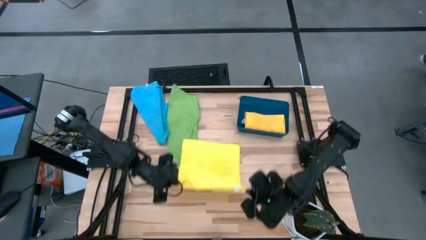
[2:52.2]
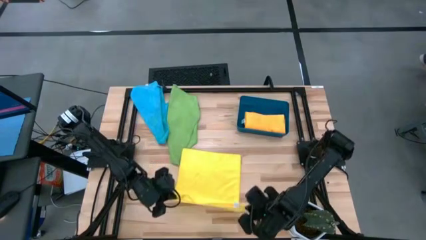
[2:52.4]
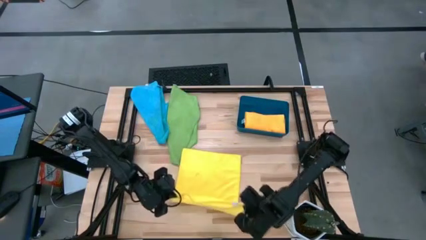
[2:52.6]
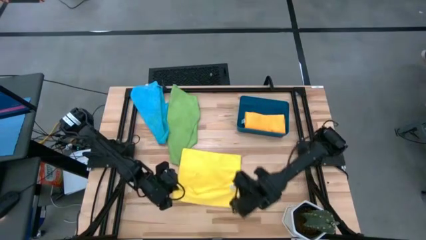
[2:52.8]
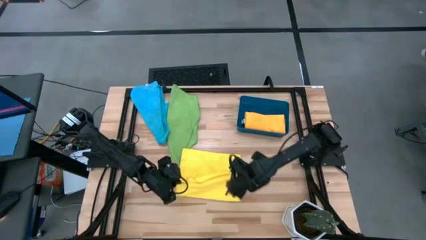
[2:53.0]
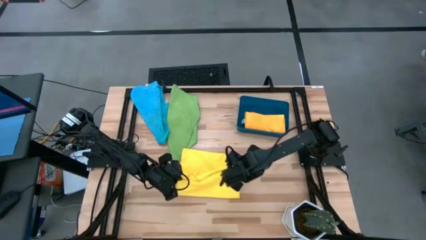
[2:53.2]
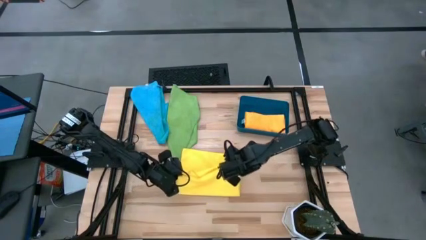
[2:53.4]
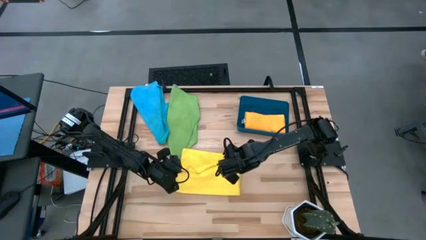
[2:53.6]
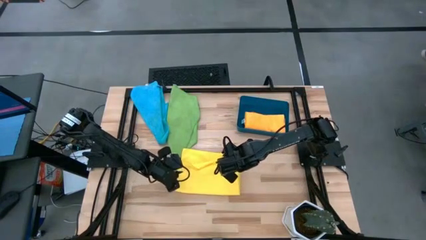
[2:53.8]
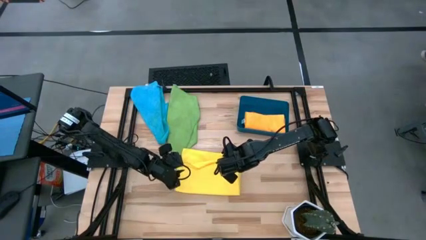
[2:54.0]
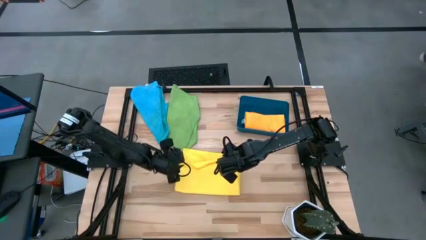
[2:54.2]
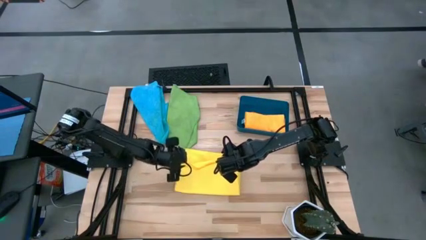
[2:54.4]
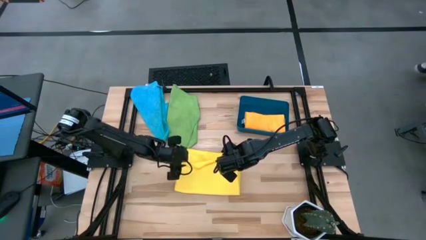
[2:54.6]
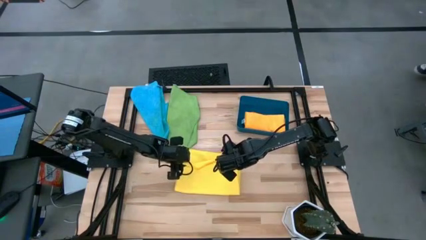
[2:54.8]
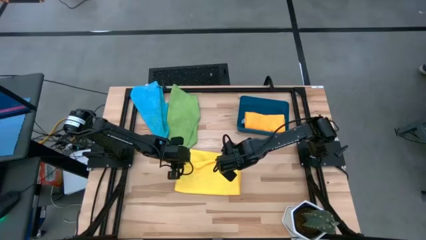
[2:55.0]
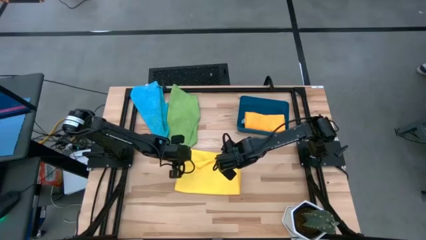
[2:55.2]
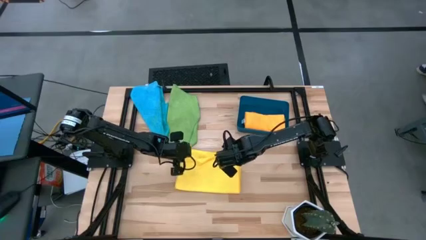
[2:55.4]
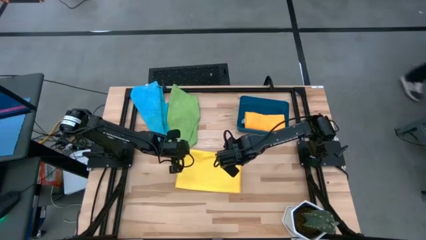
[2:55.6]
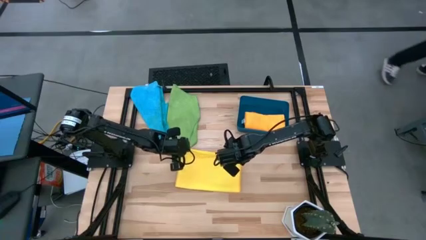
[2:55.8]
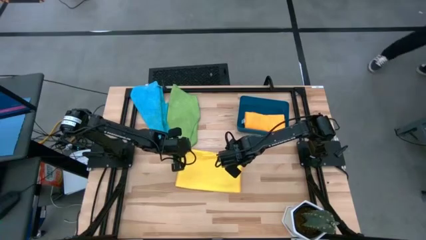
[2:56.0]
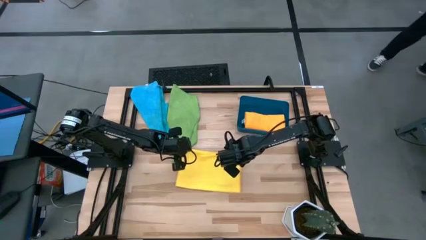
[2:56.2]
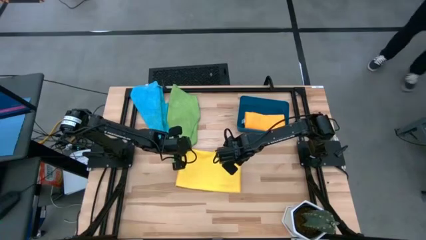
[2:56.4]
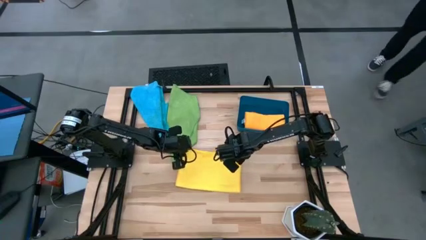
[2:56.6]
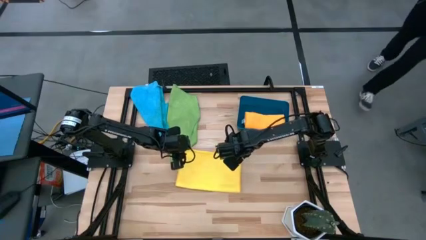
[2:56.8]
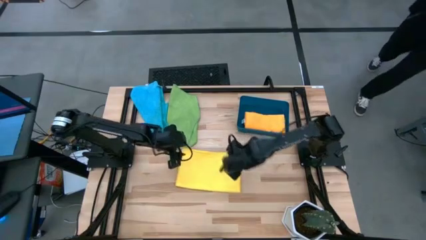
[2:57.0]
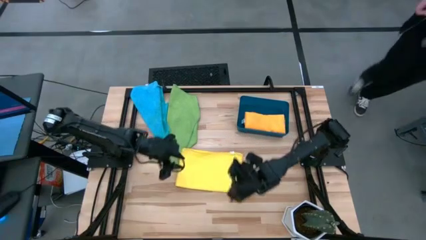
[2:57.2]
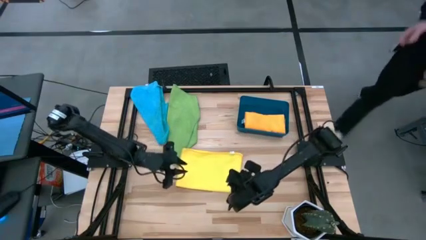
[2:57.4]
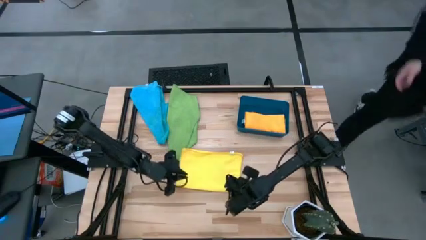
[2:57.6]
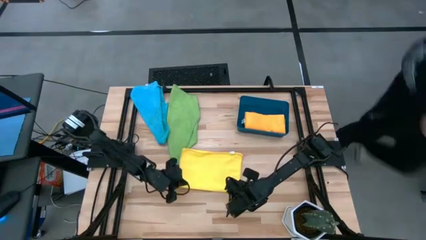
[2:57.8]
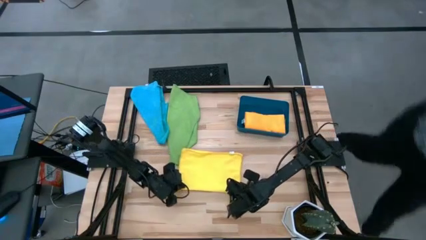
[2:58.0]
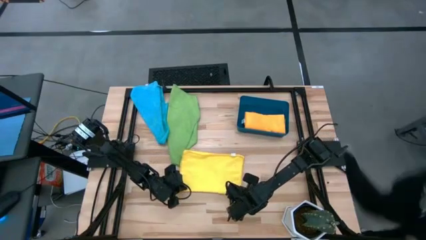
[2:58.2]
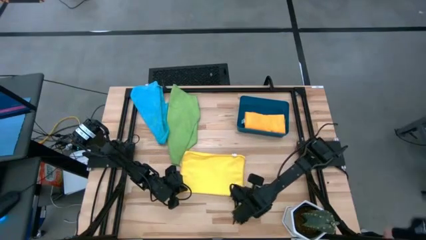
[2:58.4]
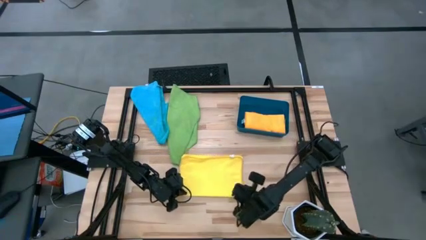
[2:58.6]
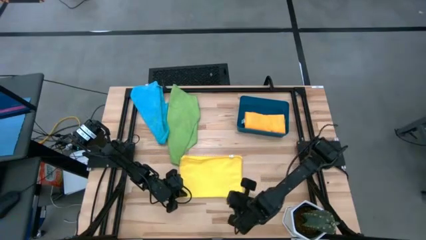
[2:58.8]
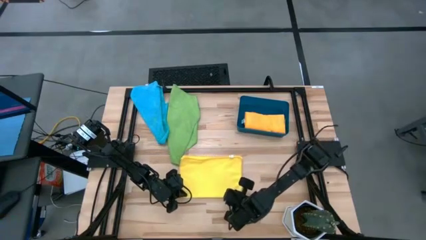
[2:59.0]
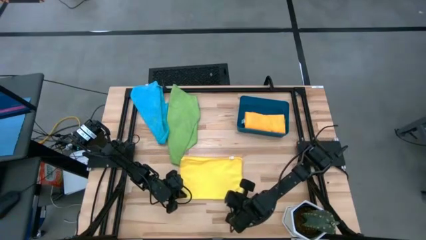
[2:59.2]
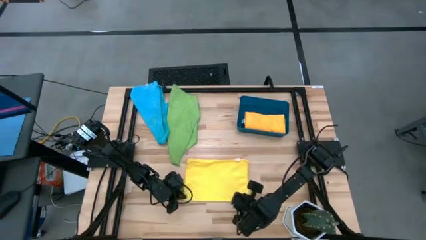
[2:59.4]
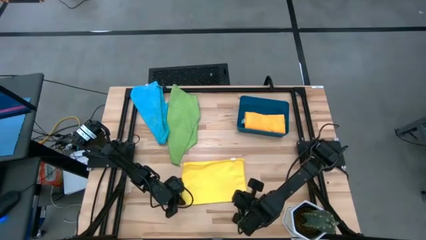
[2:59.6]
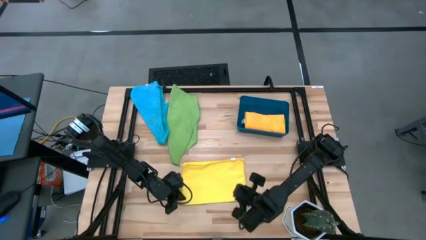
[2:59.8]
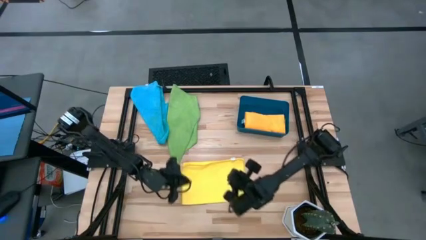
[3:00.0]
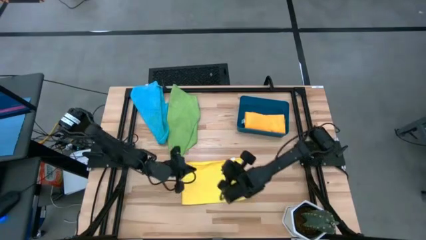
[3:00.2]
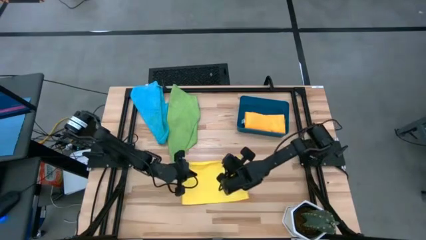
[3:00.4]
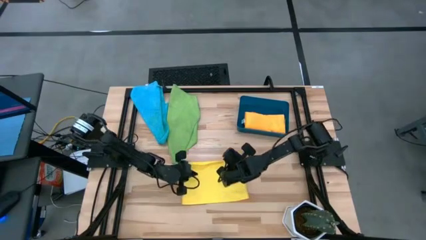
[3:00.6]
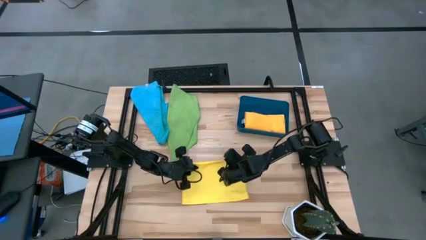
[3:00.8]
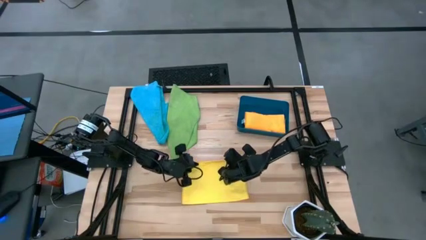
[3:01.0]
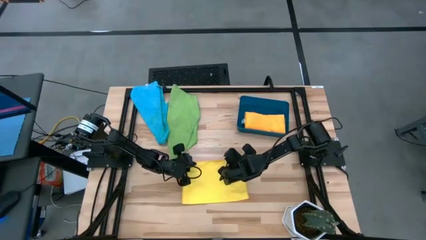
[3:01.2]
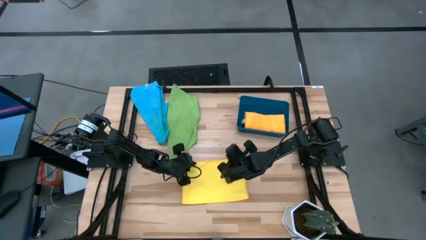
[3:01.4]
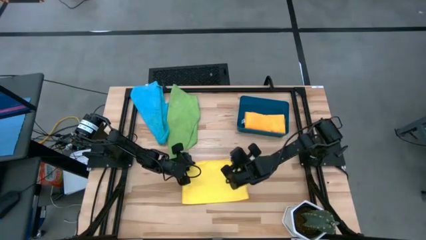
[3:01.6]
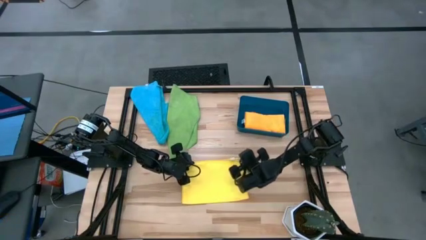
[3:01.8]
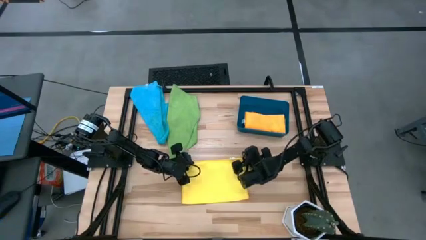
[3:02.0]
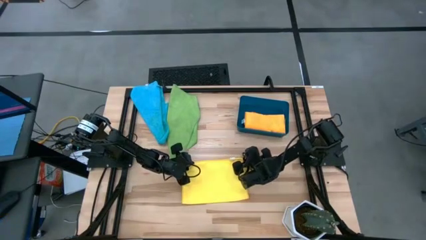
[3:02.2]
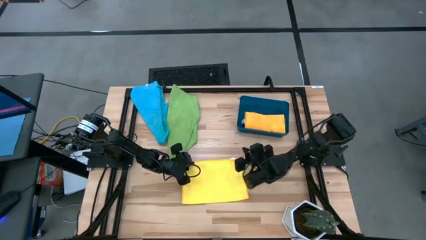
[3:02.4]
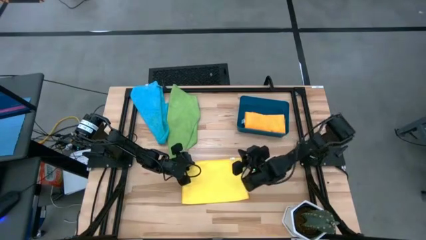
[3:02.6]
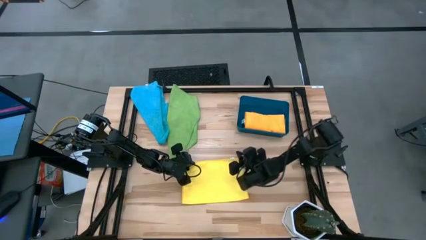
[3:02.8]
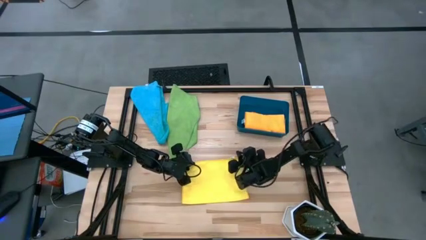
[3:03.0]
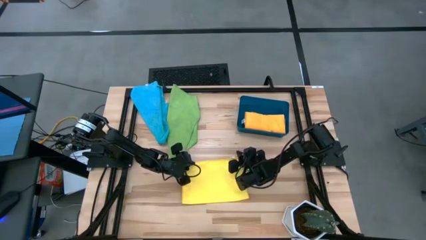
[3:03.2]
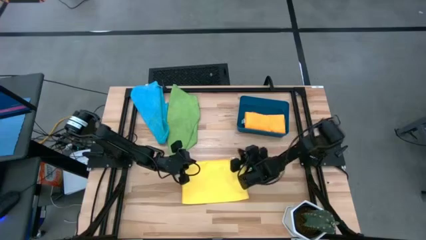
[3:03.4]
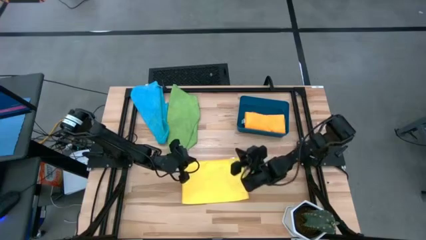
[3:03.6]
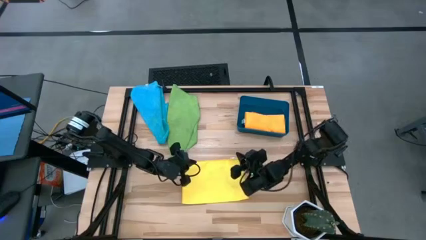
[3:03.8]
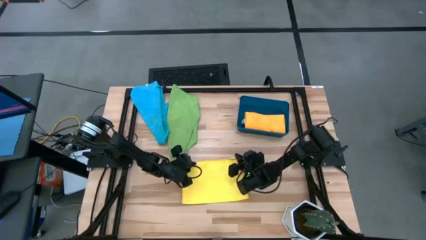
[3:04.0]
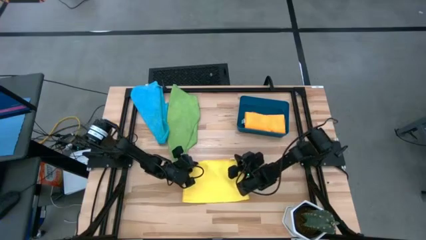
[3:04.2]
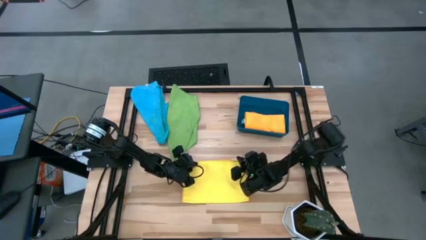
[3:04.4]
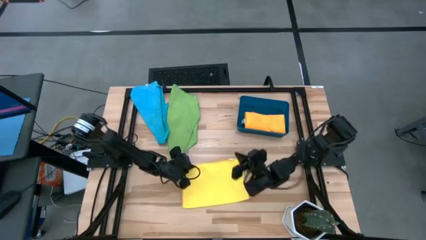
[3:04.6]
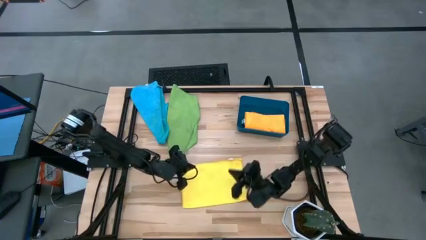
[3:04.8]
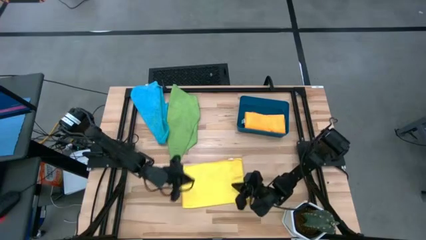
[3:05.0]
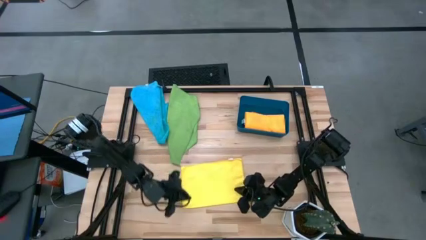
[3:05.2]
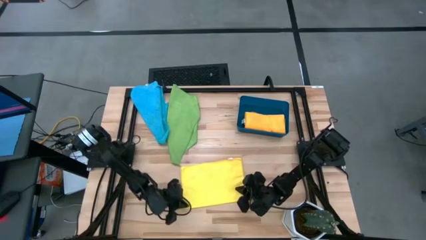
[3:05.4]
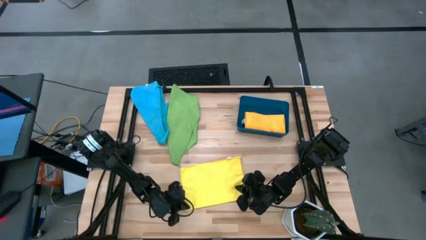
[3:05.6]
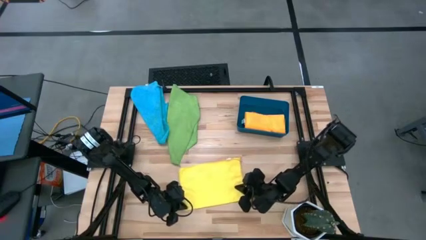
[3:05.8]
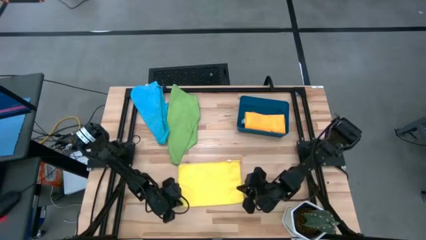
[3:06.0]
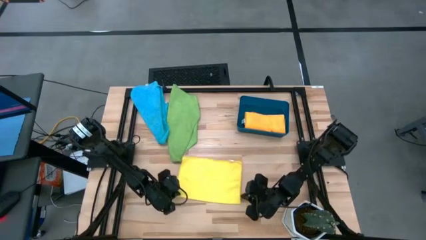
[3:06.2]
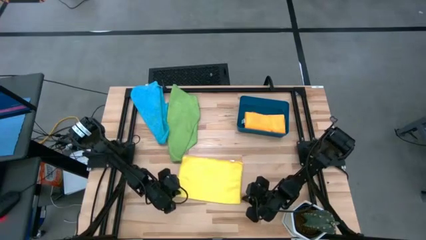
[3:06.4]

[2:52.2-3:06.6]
Task: Fold microfiber towels
Fold the yellow microfiber cloth

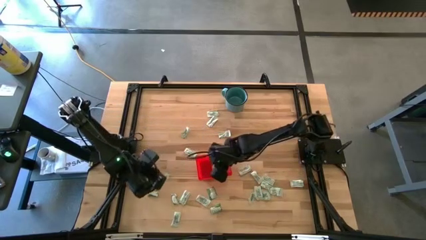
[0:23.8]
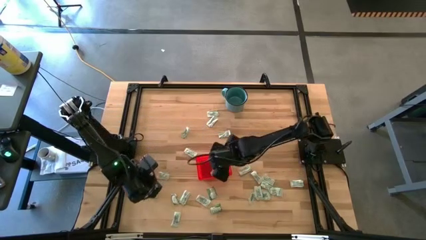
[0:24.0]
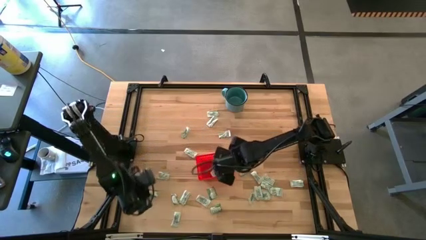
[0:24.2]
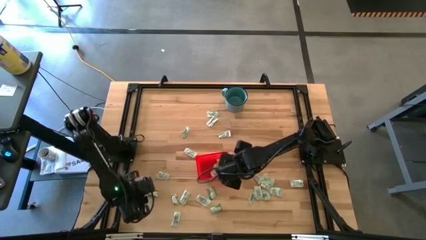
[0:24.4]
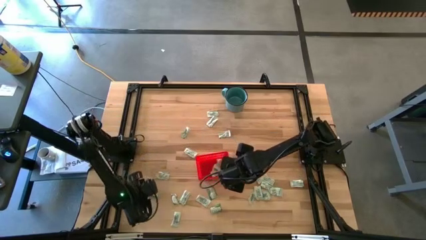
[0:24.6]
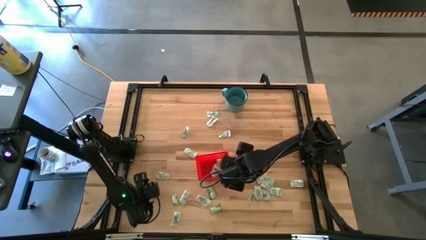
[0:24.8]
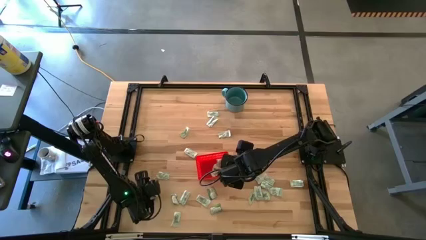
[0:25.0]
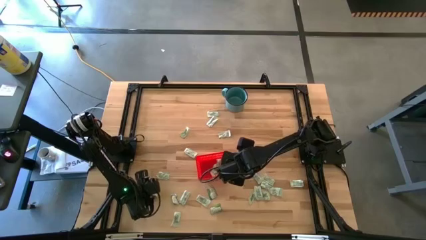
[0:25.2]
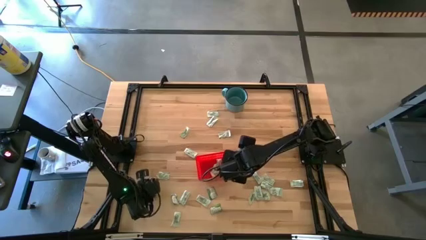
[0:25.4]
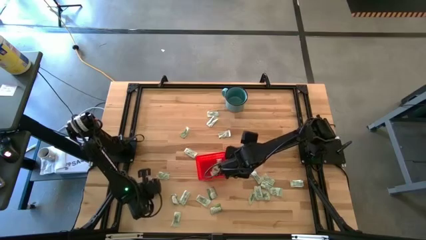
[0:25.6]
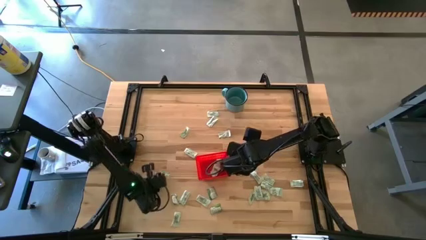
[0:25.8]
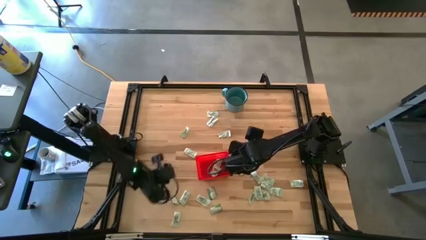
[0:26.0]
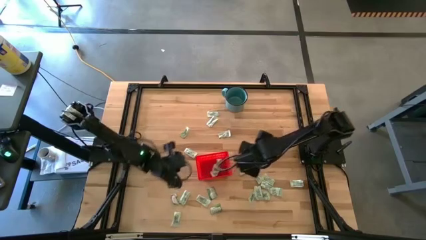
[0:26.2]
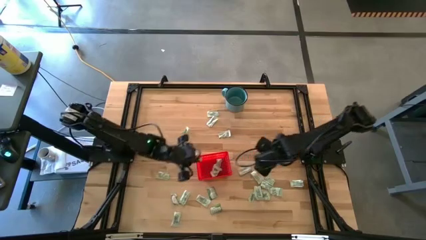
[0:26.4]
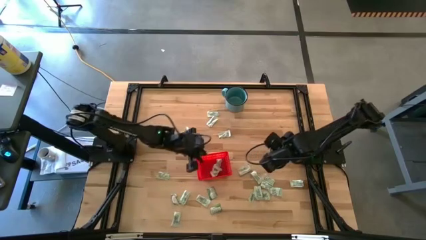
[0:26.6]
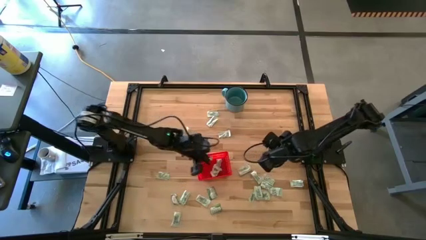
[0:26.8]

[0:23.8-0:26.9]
Task: Pick and place Stevia / Truvia into bins
Put the green truvia packet into the red bin
